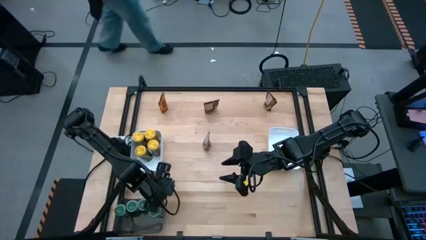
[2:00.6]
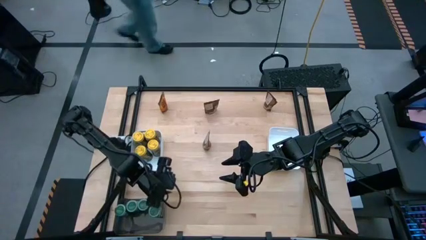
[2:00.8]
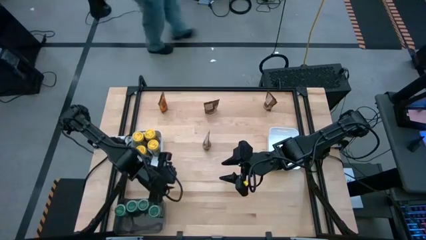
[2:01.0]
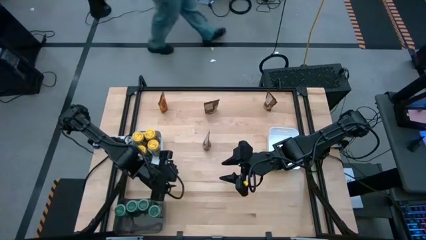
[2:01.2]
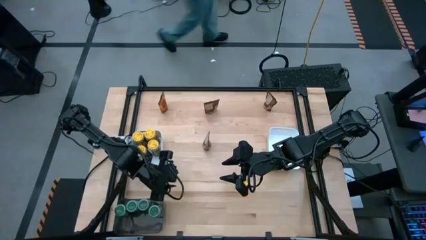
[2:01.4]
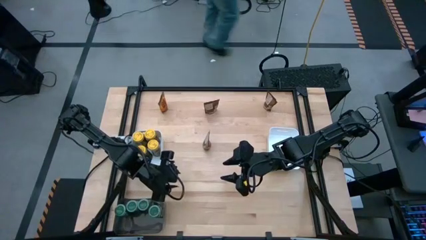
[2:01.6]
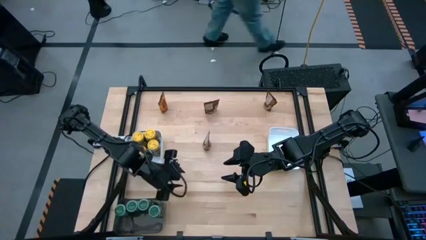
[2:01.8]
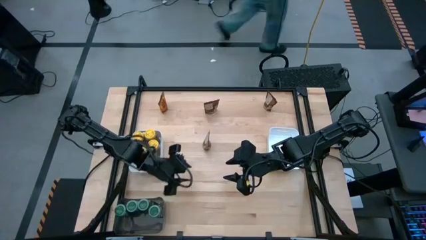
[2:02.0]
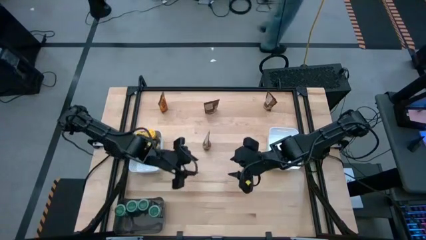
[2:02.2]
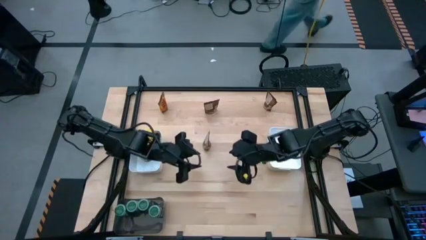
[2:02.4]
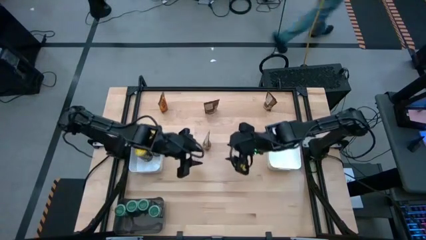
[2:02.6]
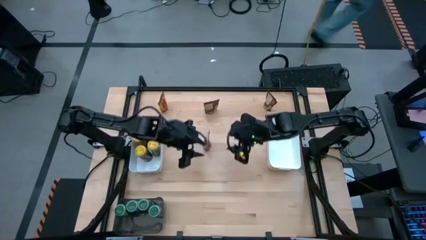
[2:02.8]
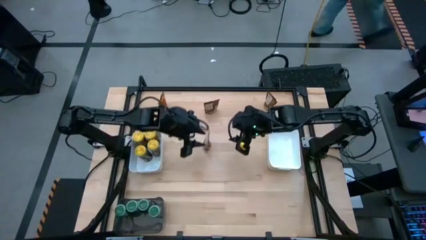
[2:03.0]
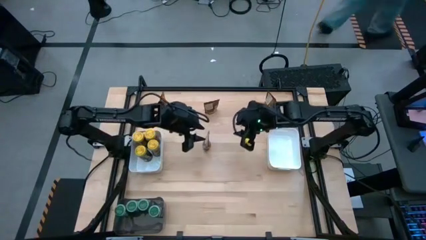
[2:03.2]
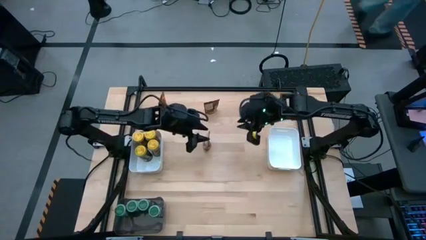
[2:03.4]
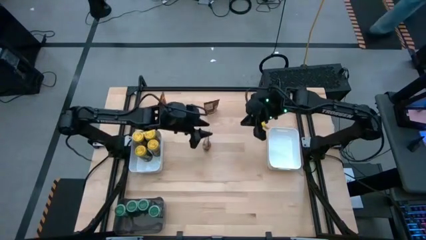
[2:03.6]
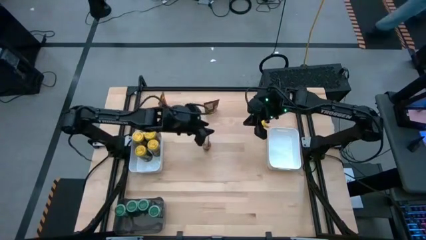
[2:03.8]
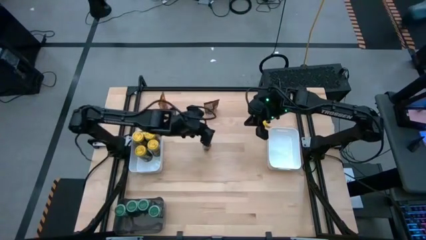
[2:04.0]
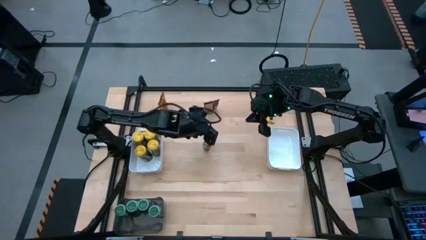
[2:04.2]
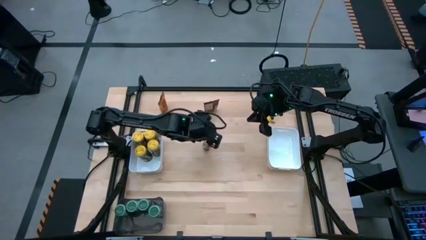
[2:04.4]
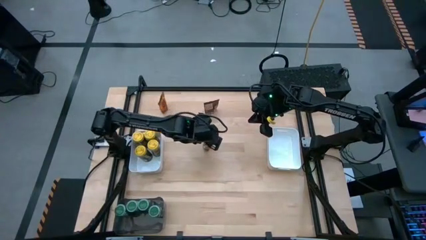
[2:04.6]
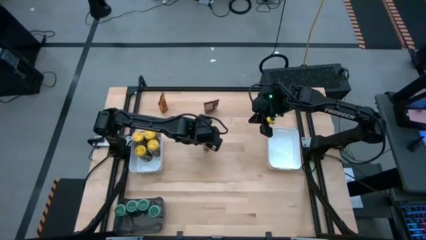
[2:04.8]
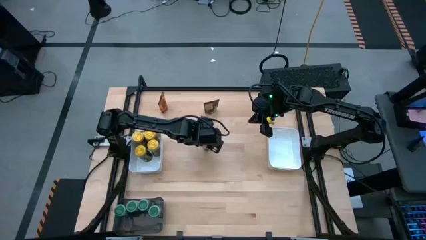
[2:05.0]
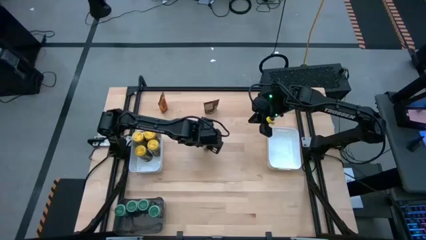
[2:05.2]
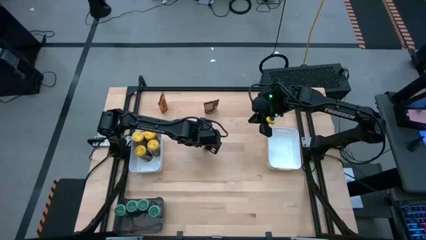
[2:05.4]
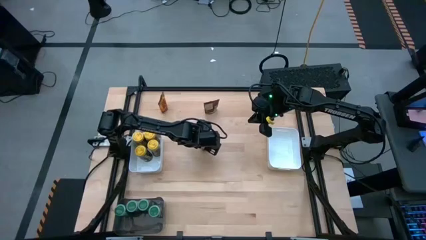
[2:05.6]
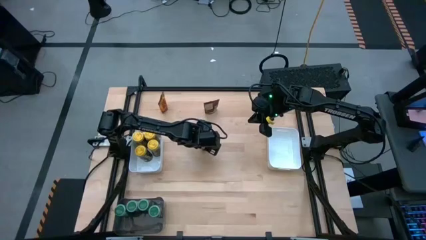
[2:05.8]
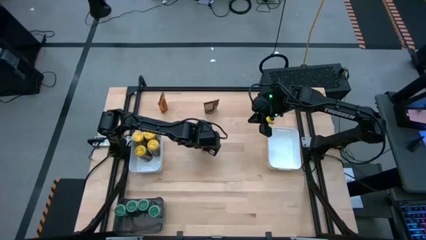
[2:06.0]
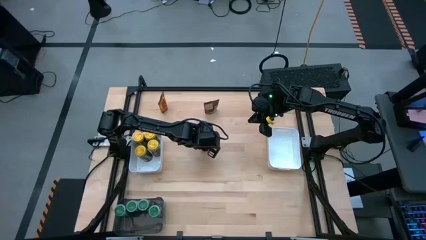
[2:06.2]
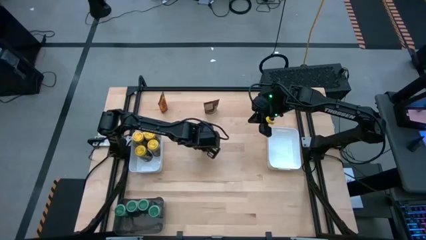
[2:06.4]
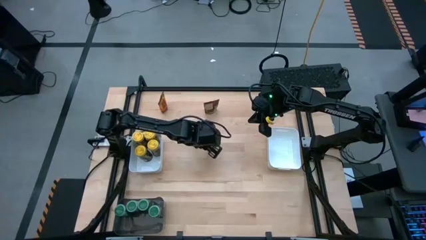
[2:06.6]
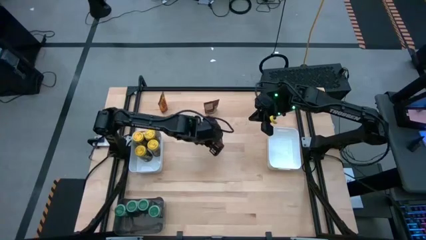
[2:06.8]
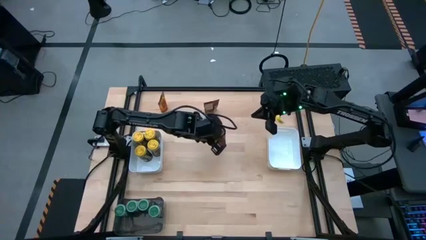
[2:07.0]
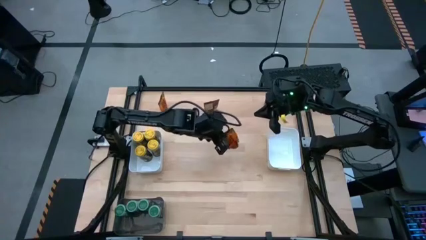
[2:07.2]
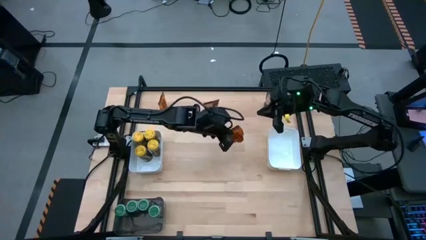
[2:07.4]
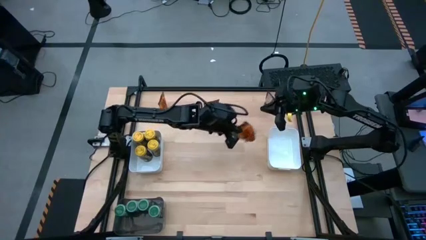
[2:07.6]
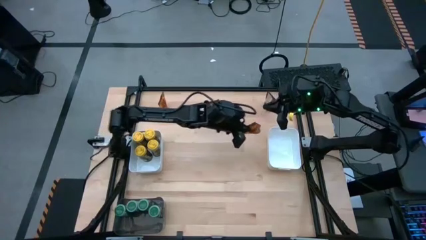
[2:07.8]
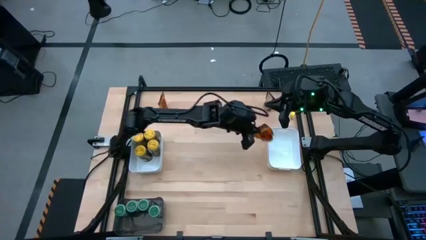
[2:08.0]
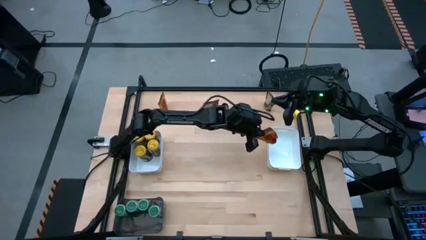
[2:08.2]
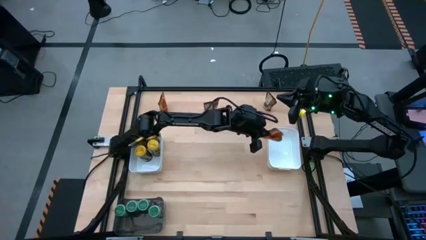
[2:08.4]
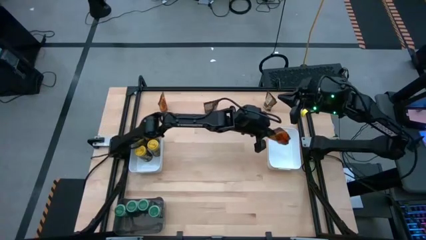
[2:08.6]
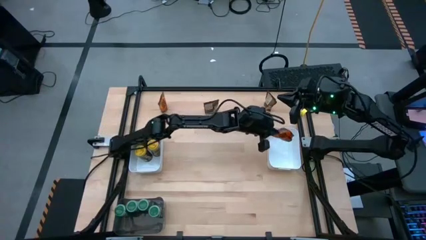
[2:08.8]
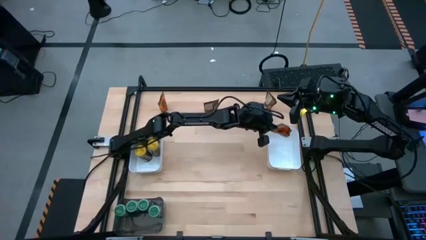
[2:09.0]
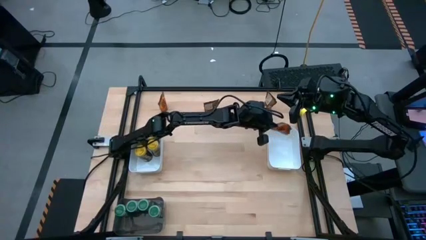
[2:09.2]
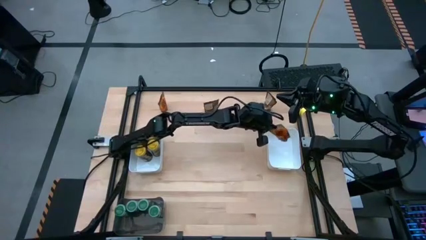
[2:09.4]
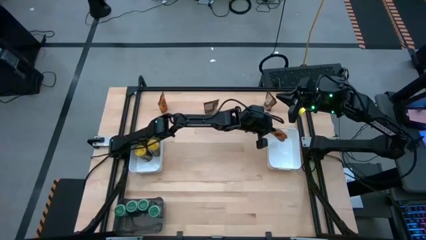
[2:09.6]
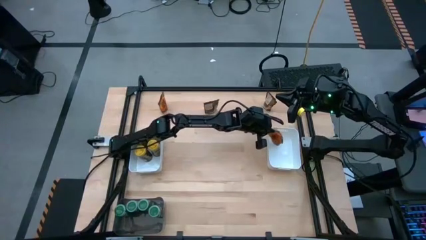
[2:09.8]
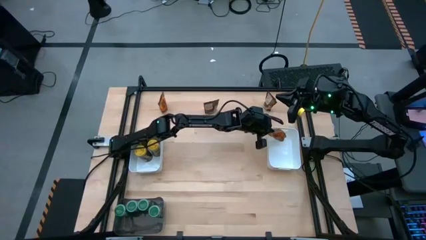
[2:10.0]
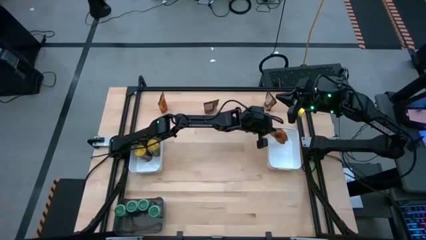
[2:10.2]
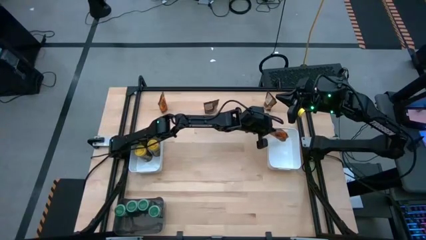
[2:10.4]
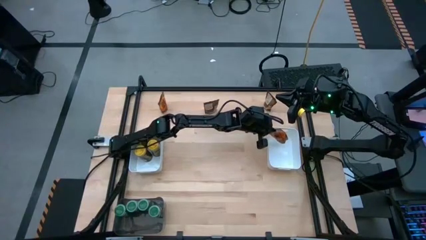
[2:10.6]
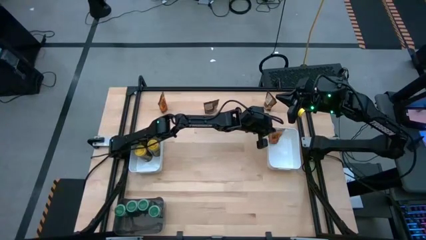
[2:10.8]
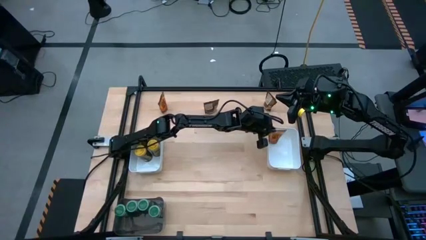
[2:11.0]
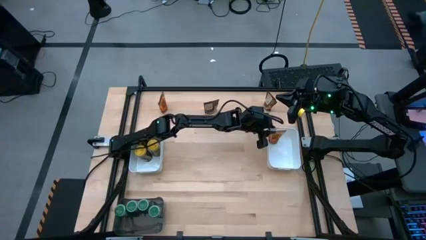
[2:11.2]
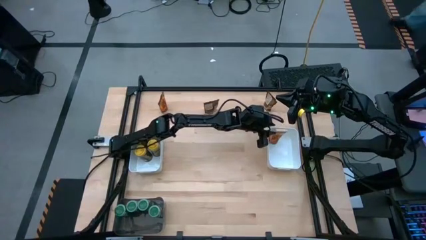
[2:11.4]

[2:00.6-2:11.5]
Task: Sort spices by type
Put the bottom orange seasoning bag into the right white bin

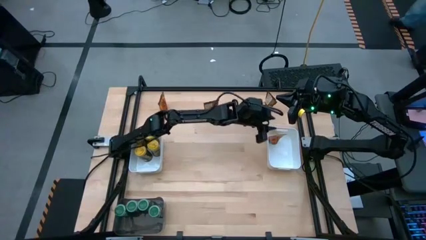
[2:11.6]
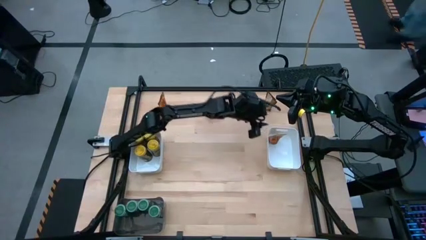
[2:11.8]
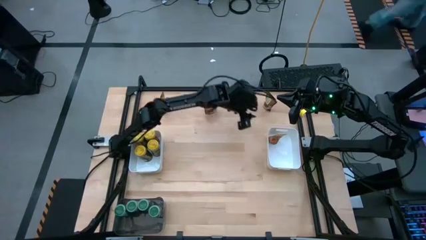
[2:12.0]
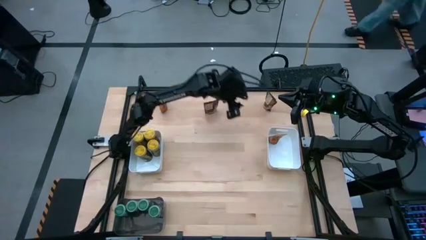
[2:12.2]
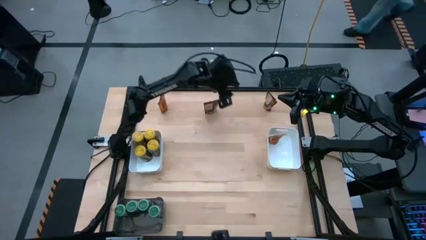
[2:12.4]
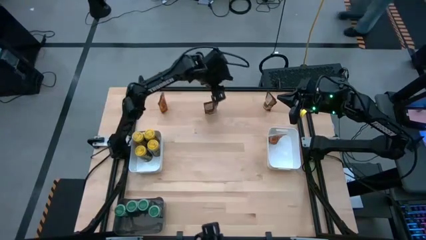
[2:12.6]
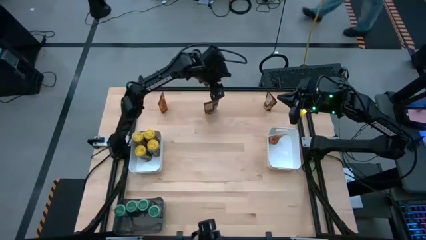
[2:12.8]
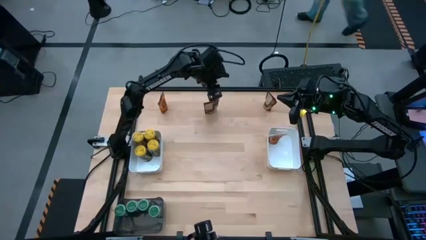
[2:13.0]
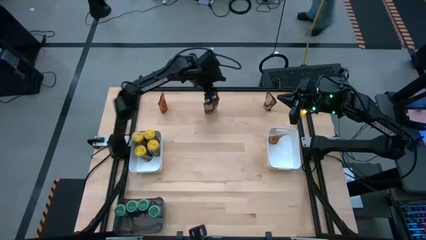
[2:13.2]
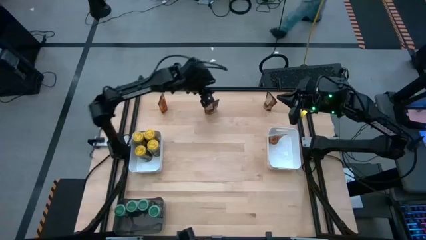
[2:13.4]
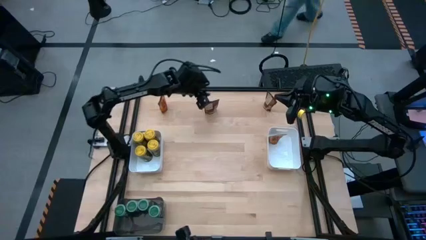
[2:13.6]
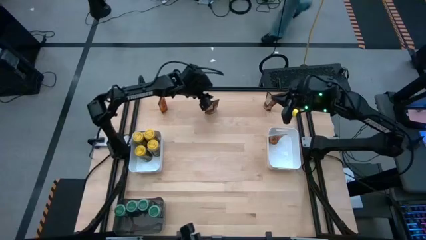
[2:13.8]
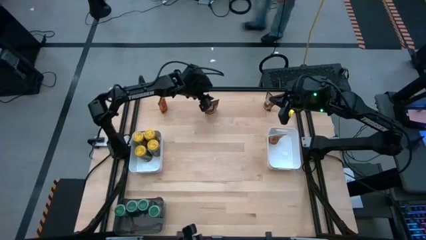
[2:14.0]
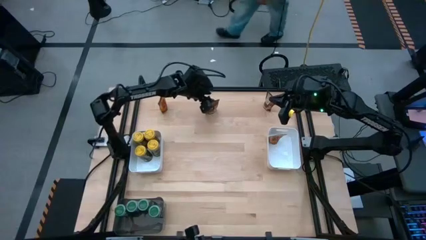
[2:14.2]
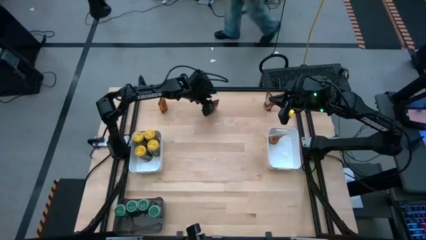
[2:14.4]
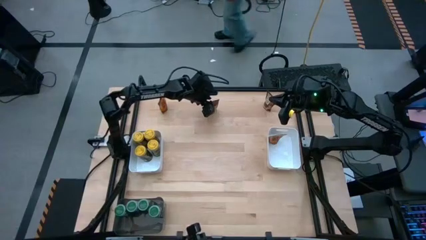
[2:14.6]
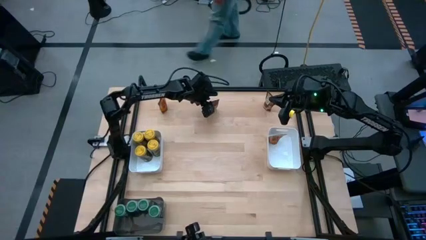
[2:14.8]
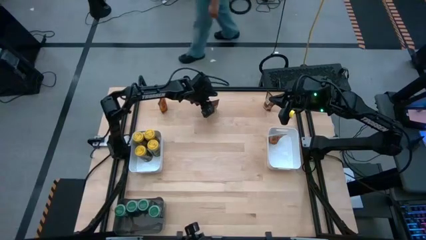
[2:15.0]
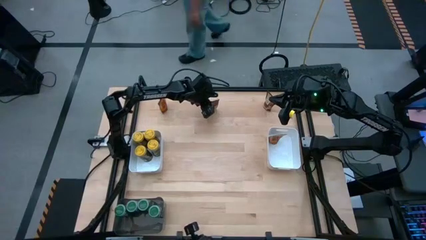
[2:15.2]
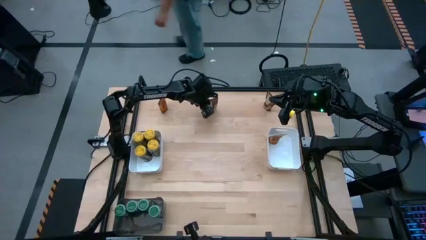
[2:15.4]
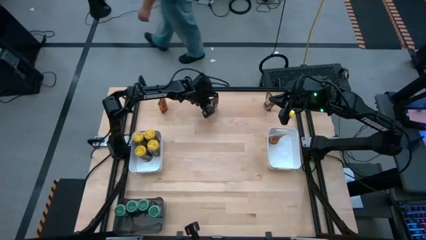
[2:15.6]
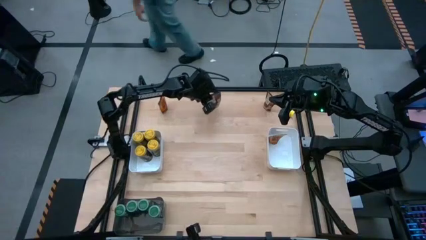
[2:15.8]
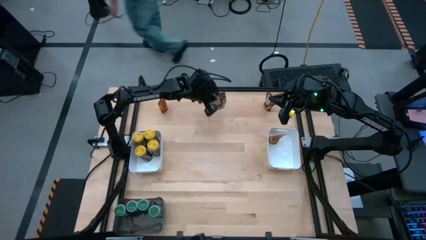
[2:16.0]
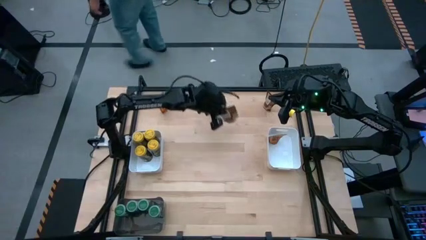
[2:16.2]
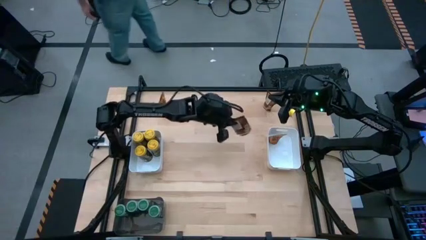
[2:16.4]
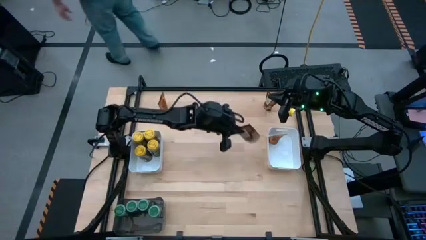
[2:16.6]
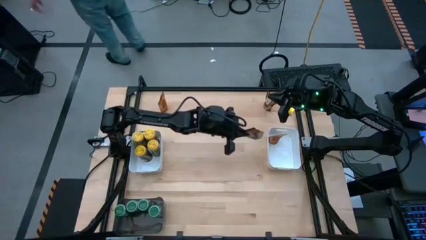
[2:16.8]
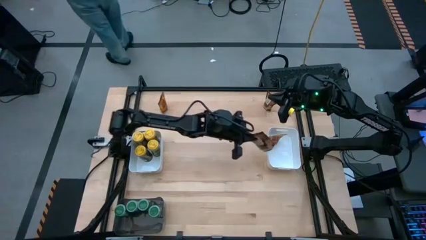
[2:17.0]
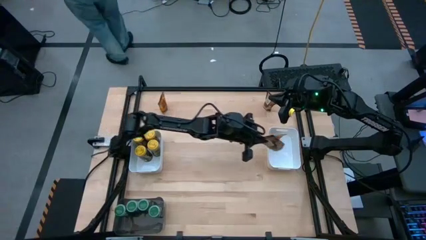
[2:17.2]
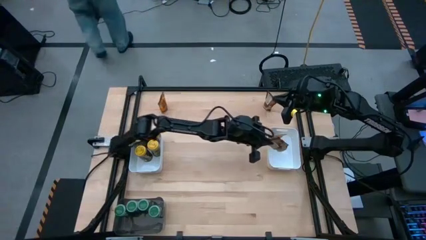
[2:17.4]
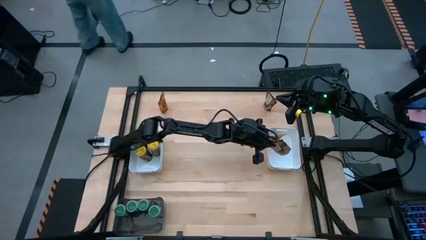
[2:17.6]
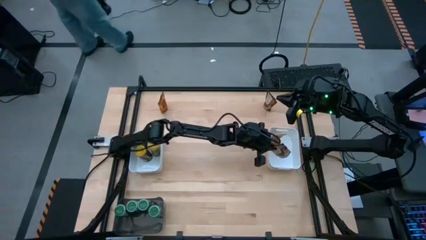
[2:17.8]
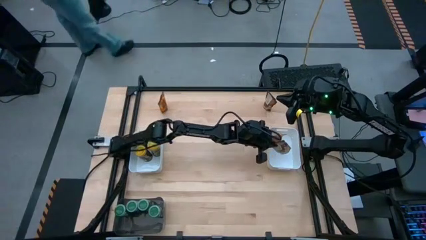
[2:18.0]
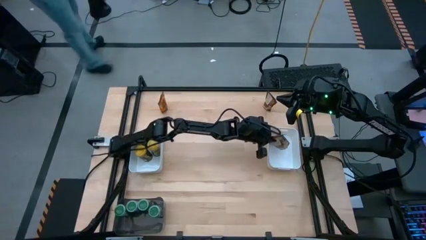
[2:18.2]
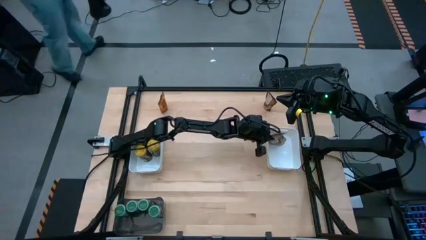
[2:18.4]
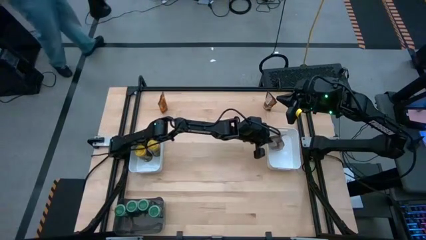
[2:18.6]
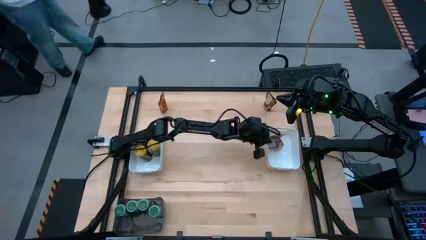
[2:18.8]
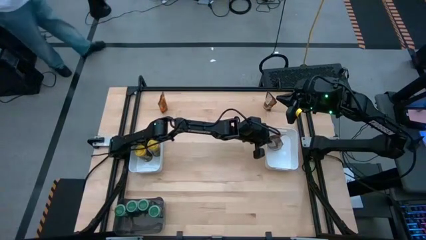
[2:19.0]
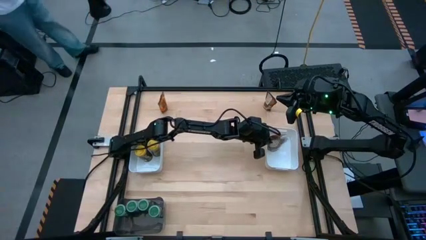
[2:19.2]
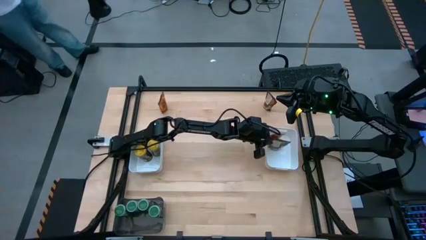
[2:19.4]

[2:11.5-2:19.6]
Put the middle orange seasoning bag into the right white bin
